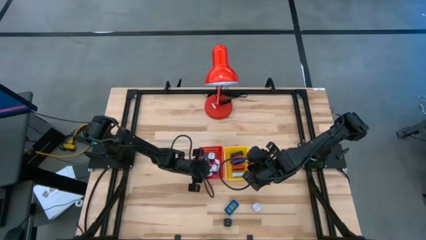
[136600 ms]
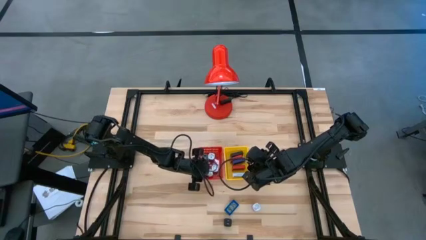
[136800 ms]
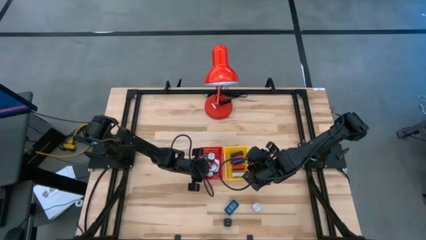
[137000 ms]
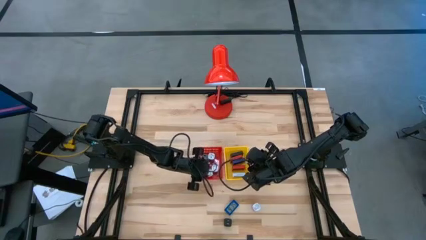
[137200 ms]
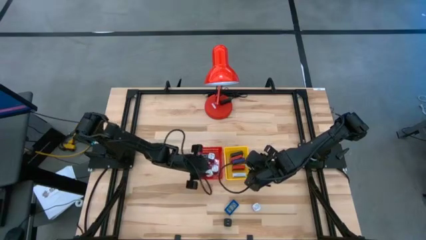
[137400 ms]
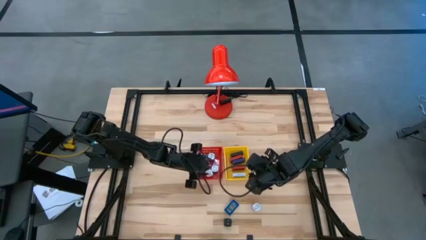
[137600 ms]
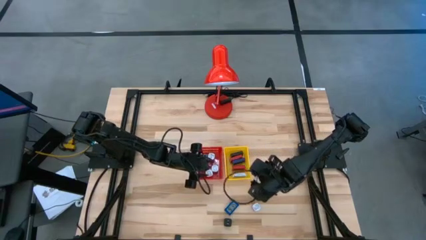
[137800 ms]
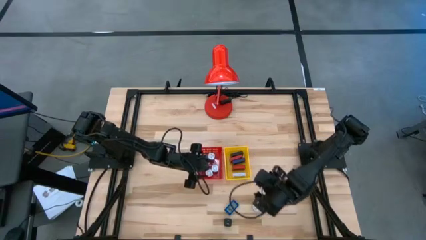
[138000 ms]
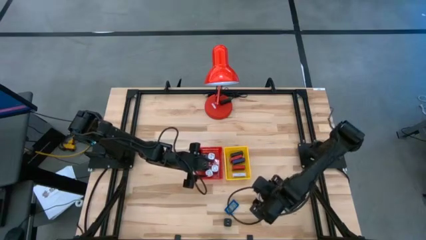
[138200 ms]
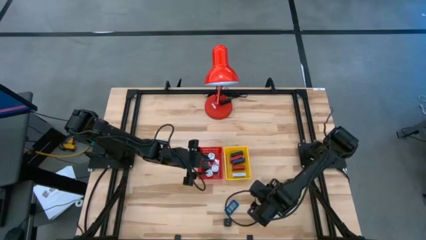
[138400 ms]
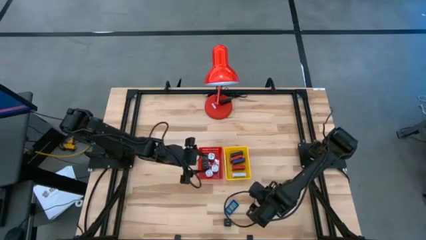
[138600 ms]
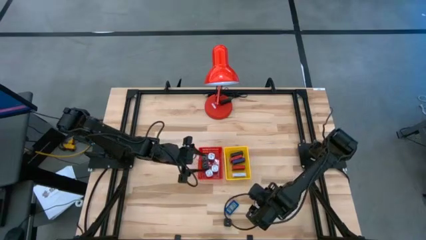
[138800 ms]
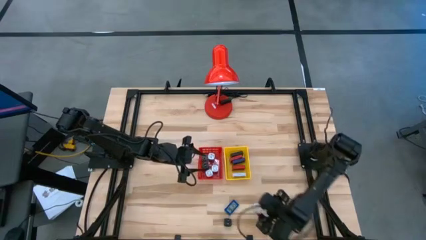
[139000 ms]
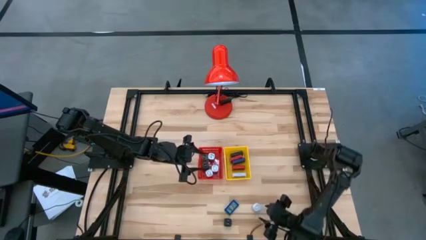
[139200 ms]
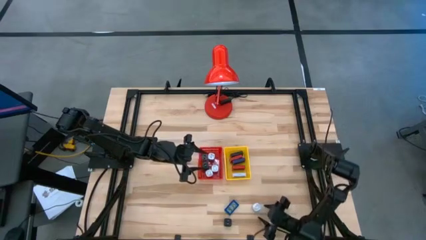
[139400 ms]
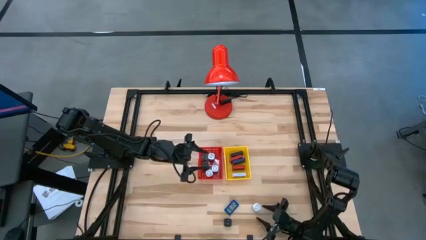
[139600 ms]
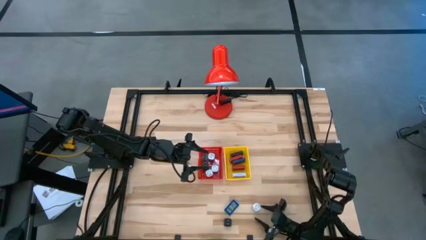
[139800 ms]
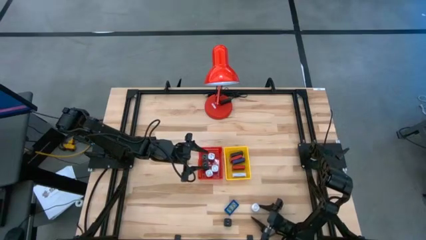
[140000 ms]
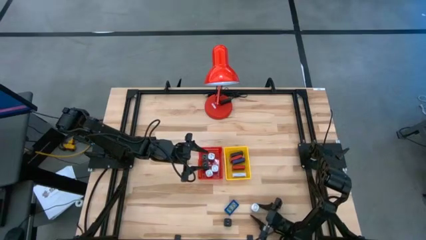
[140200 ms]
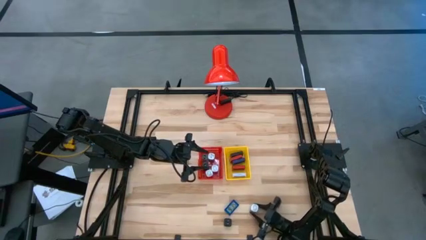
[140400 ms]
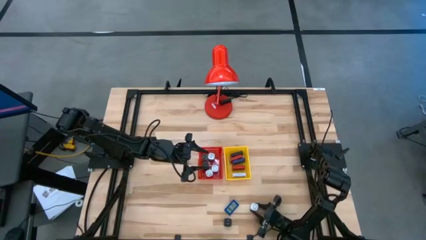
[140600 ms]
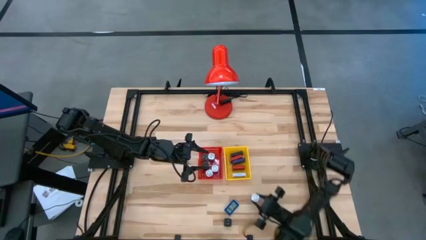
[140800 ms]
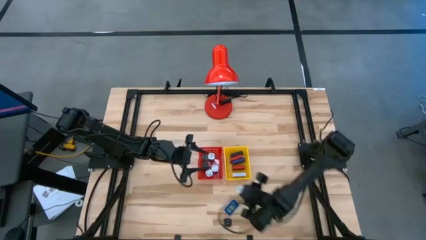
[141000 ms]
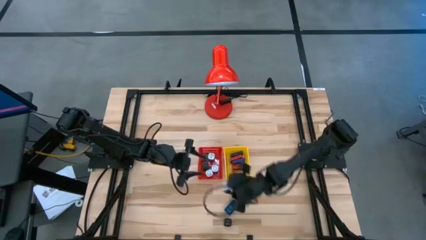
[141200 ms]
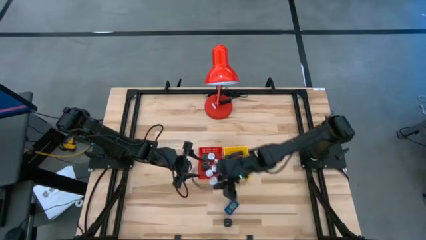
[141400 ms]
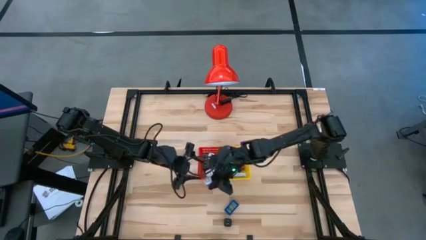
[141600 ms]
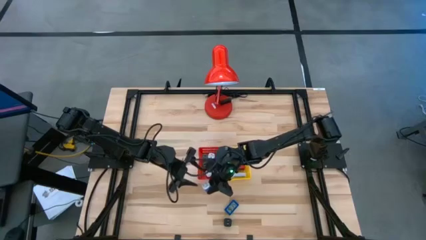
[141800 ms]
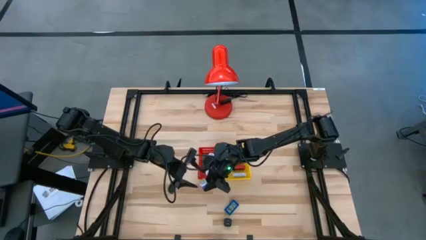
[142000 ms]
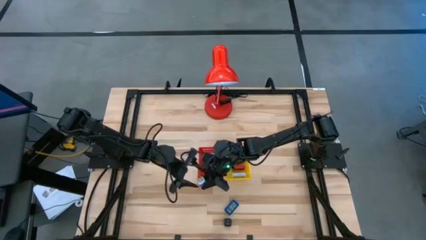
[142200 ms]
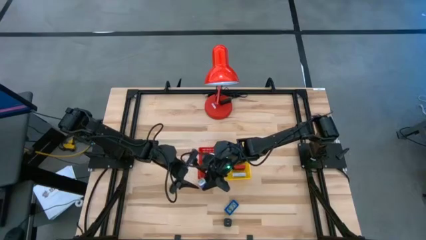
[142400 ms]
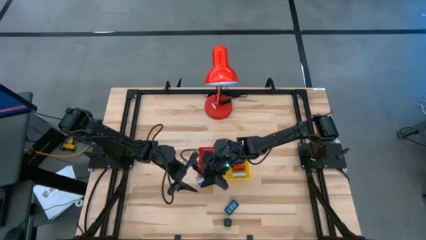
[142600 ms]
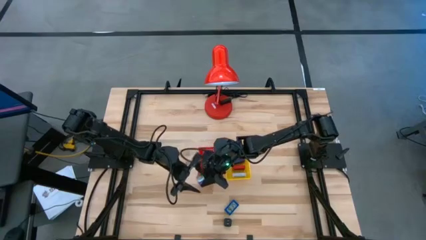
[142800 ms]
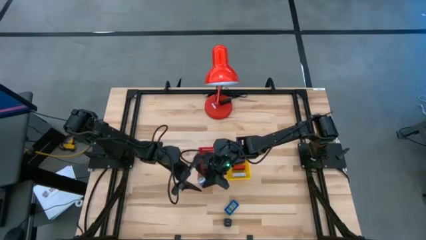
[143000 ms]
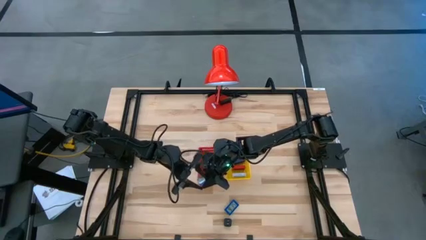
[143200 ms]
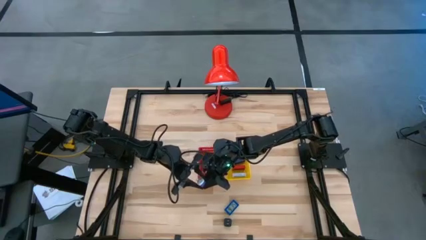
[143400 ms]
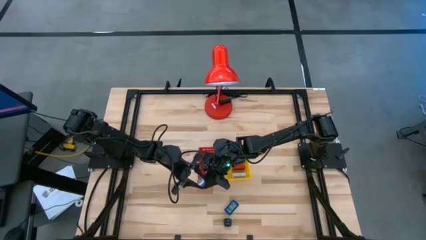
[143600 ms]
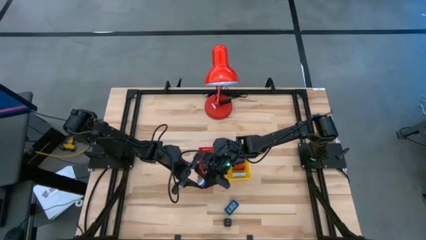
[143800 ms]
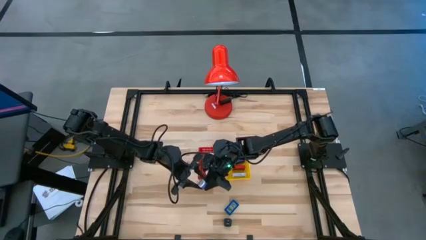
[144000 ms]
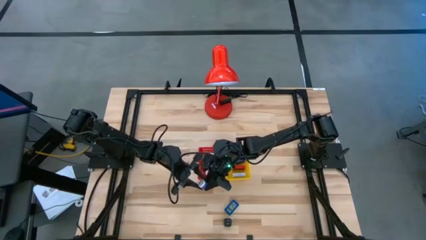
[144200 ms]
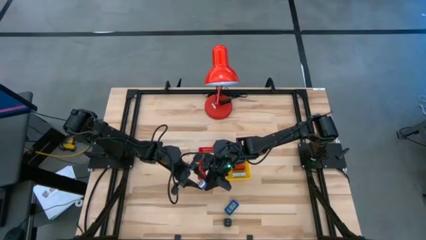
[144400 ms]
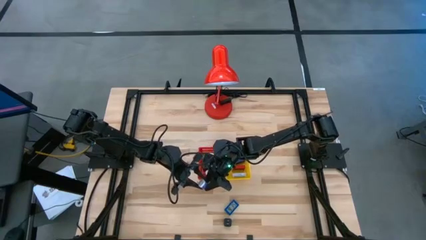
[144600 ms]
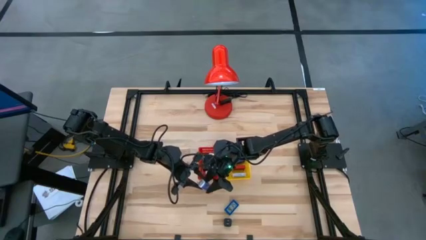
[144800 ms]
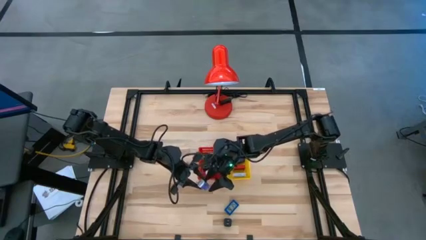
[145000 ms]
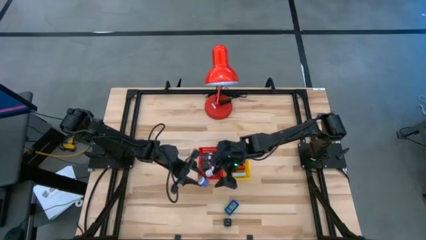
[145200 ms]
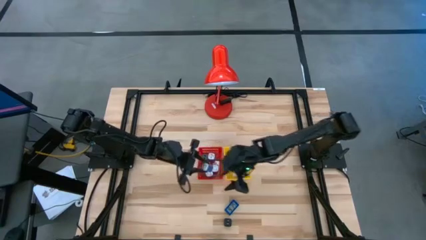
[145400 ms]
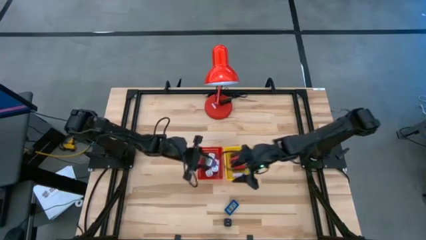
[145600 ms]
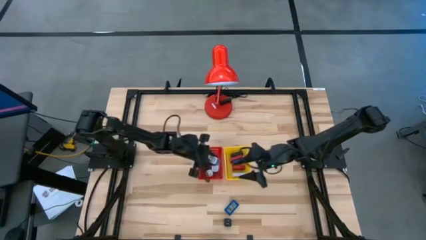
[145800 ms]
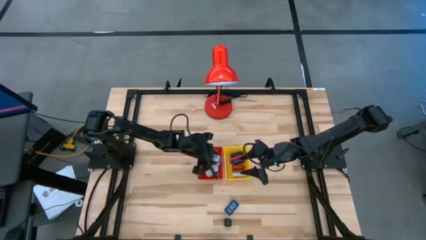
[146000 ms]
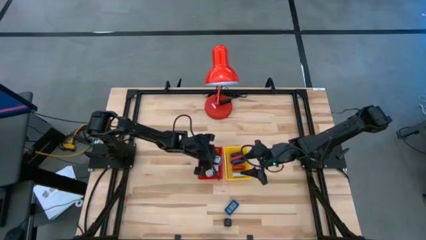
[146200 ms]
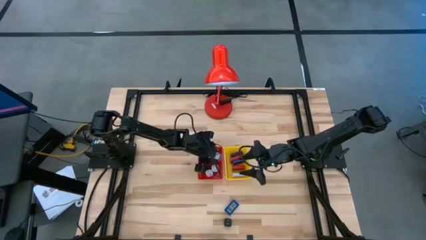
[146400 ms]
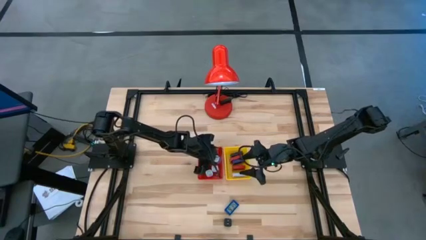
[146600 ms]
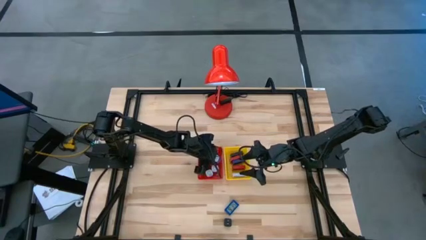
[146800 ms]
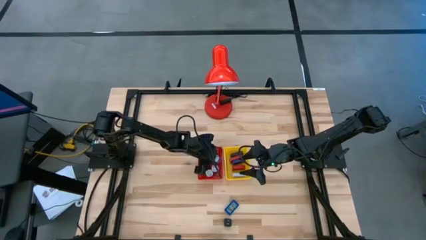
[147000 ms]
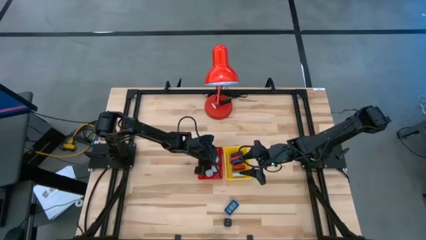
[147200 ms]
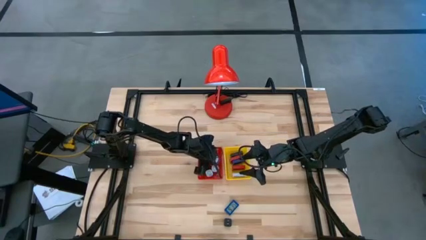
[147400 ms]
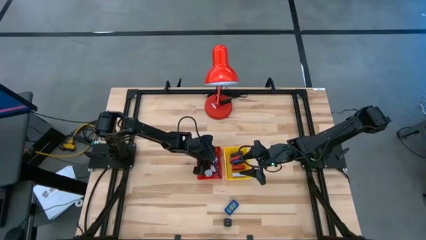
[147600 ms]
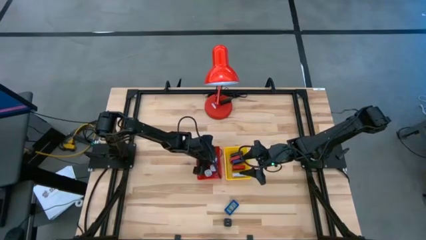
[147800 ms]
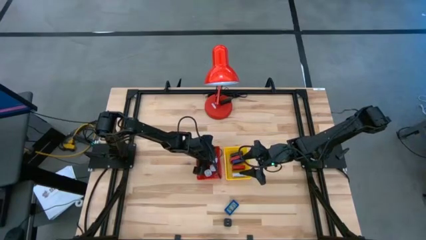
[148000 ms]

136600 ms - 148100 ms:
Task: Pick & Place Office items
Put the purple charger adaptor into the red bin

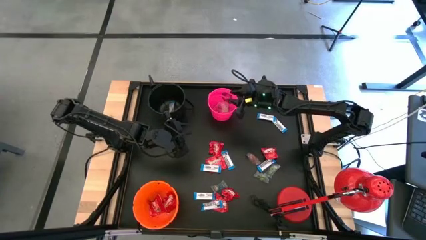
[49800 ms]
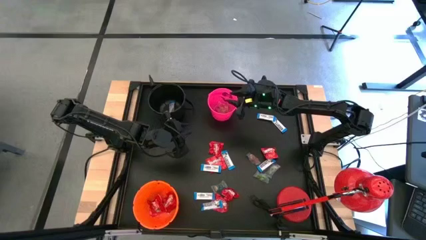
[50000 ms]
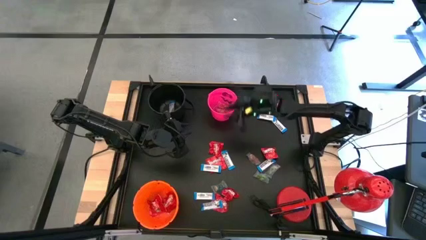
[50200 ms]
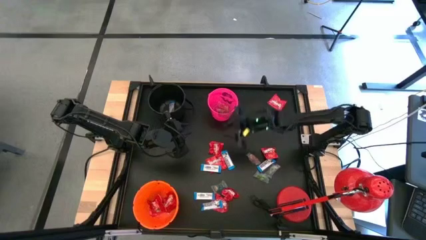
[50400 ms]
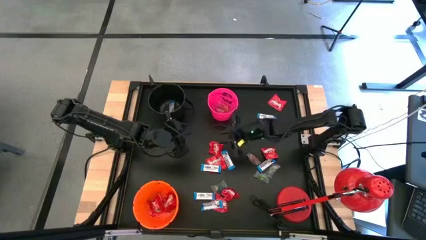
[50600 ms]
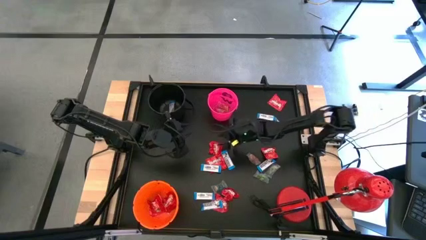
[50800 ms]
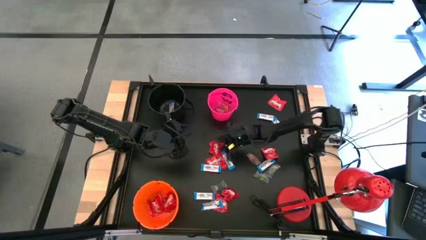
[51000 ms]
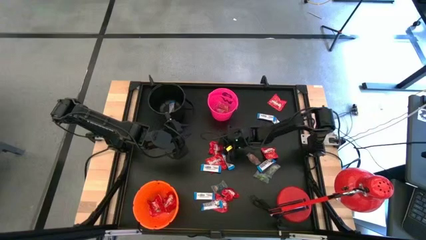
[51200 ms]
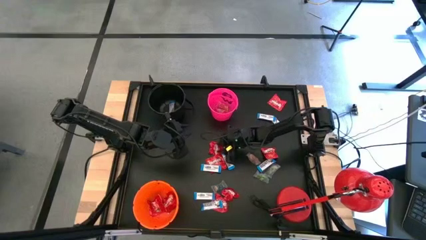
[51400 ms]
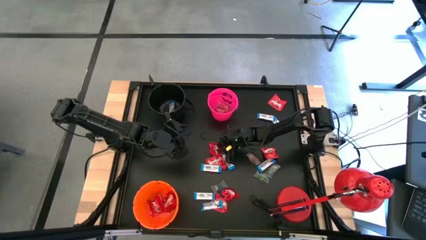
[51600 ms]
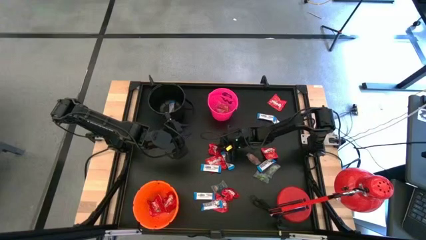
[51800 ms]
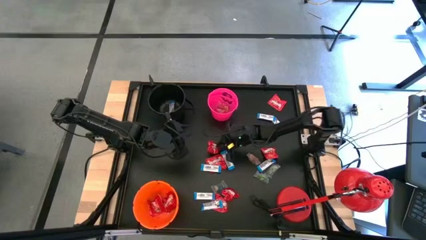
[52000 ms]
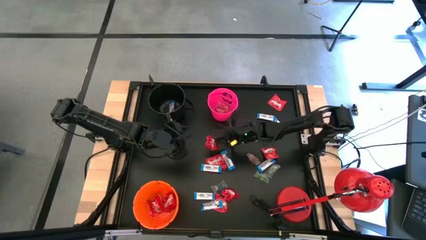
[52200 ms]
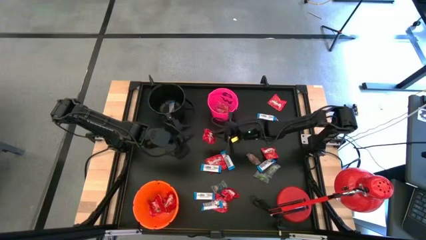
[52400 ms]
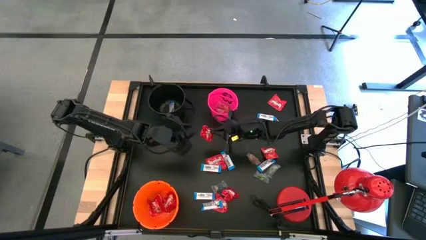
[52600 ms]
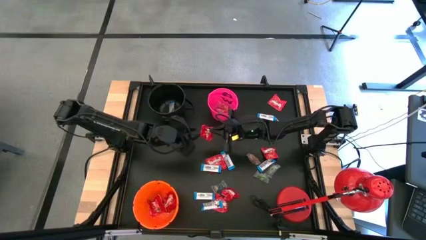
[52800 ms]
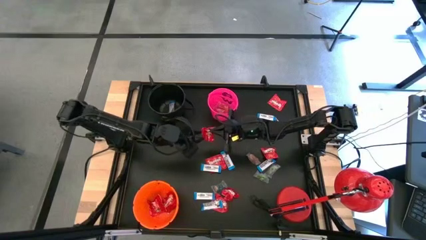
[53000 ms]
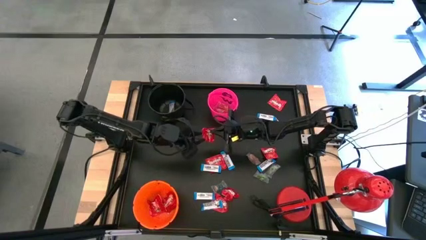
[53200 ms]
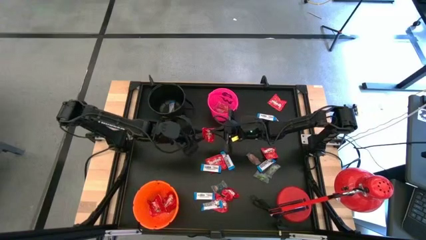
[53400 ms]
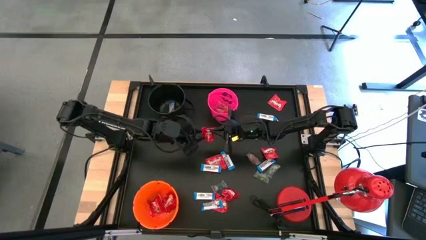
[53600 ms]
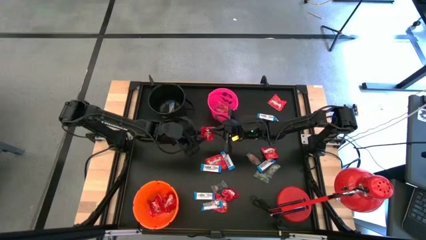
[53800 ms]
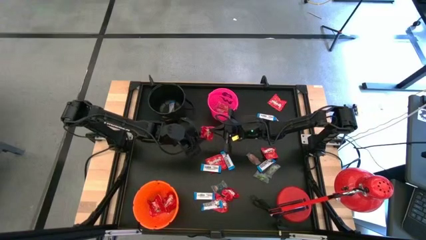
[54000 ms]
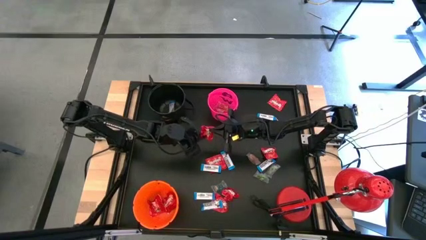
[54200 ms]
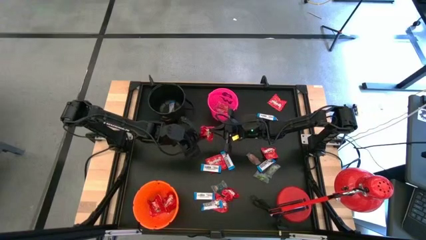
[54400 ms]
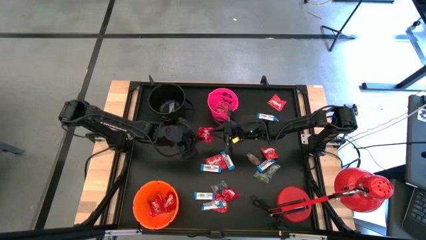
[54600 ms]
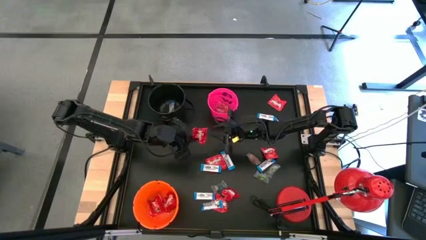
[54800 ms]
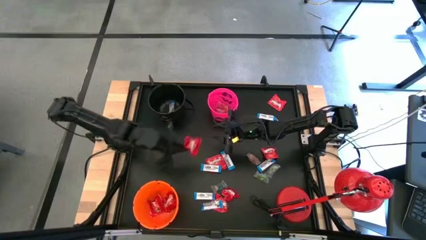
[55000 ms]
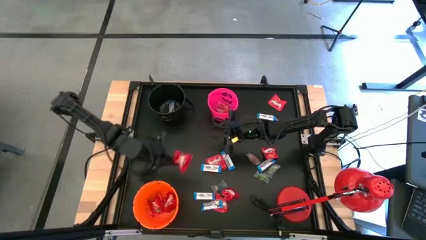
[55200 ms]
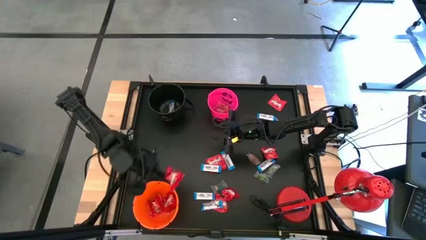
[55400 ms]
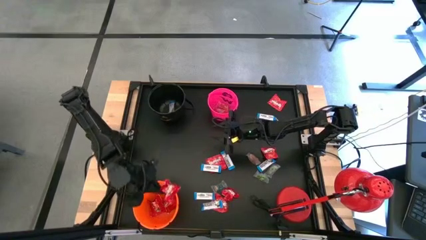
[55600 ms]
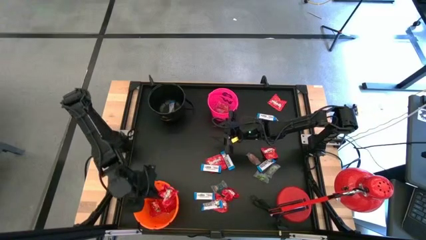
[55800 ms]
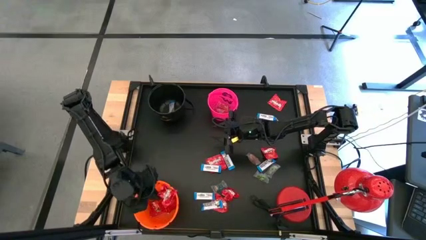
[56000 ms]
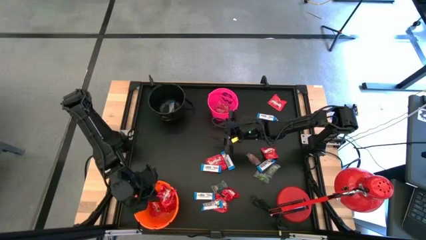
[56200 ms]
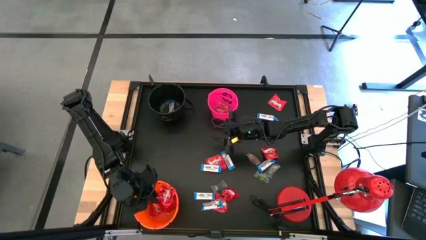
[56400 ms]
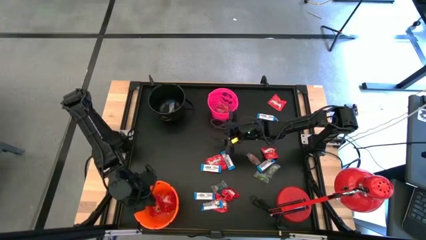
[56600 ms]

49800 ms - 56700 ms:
Task: Organize candy in baskets
Put the red candy into the orange bucket
